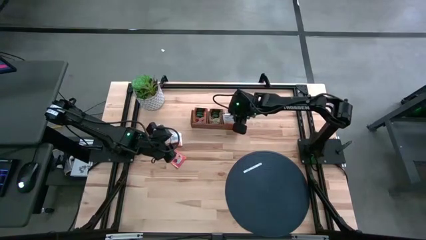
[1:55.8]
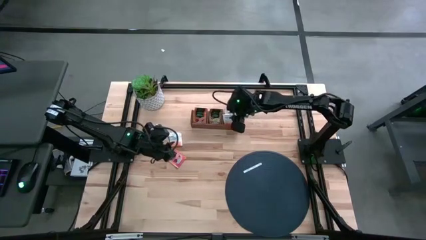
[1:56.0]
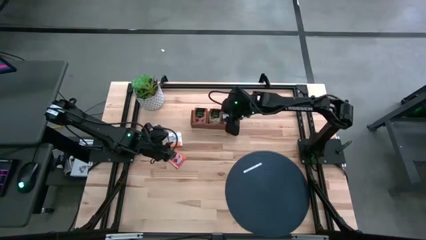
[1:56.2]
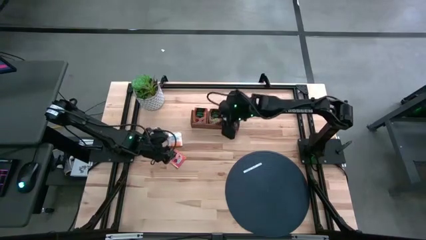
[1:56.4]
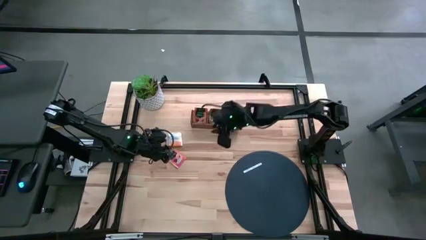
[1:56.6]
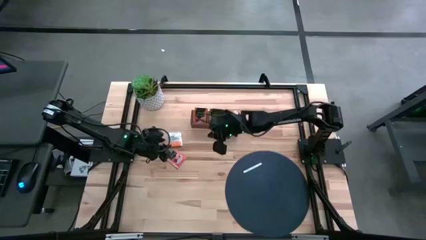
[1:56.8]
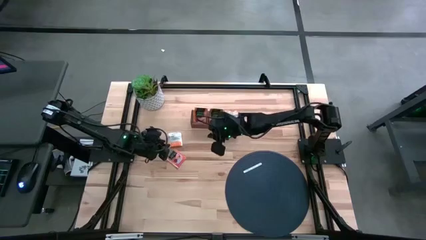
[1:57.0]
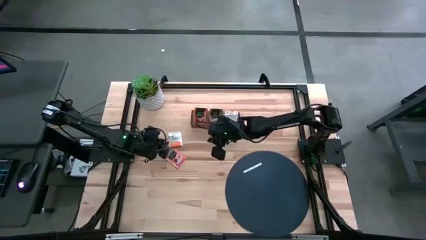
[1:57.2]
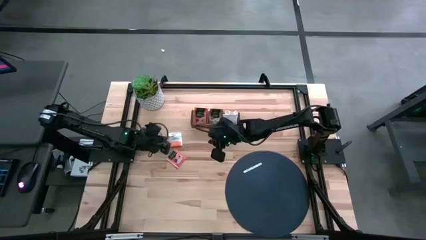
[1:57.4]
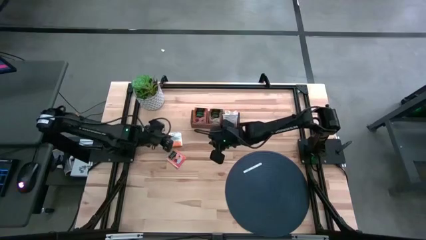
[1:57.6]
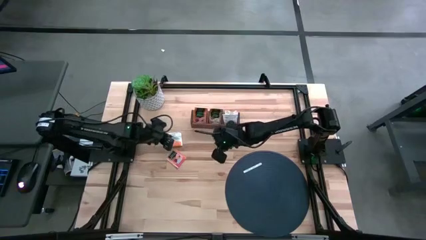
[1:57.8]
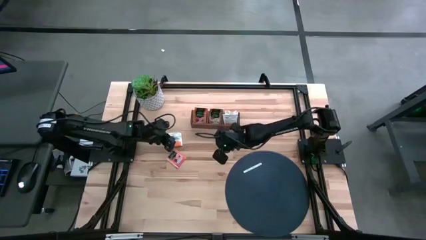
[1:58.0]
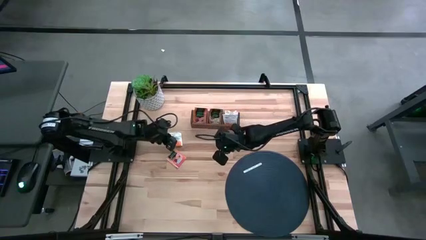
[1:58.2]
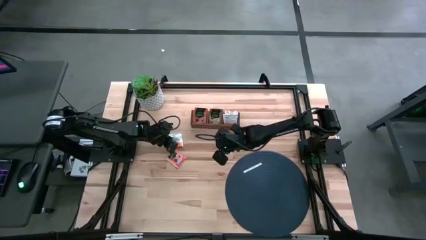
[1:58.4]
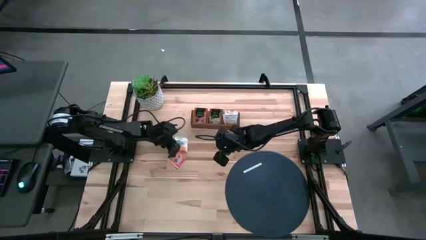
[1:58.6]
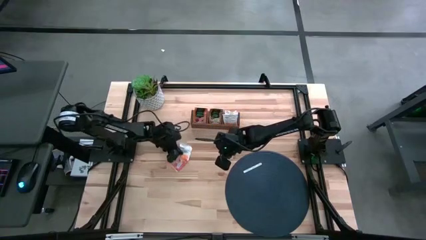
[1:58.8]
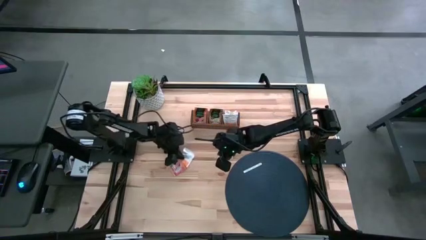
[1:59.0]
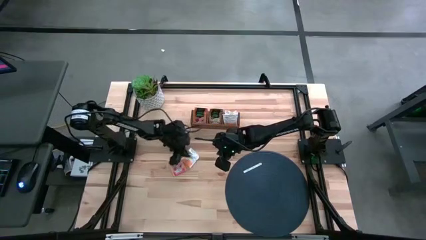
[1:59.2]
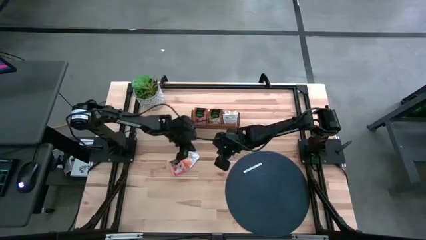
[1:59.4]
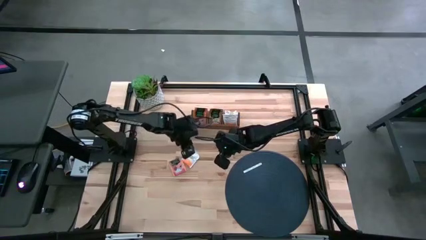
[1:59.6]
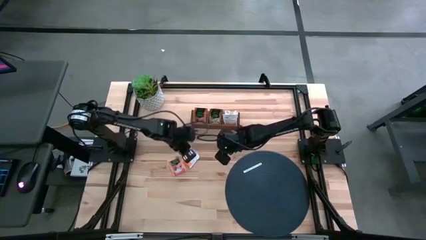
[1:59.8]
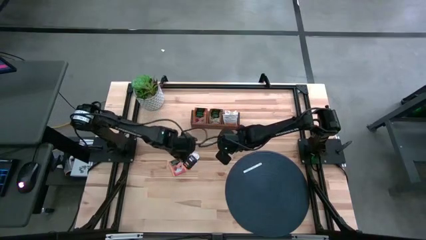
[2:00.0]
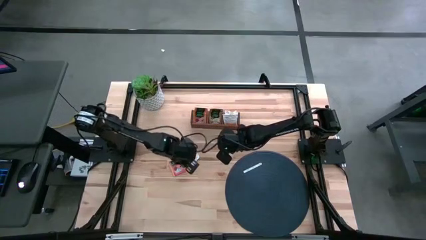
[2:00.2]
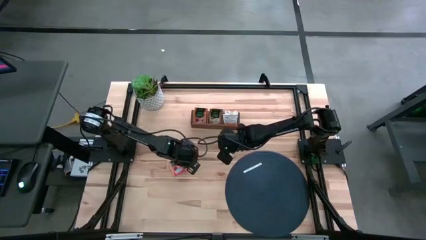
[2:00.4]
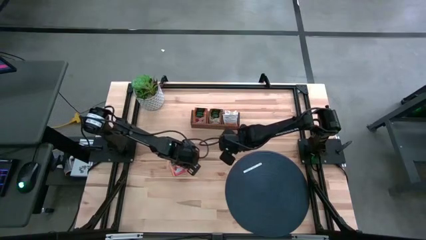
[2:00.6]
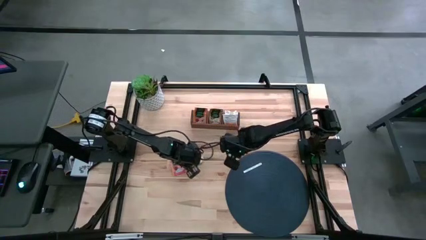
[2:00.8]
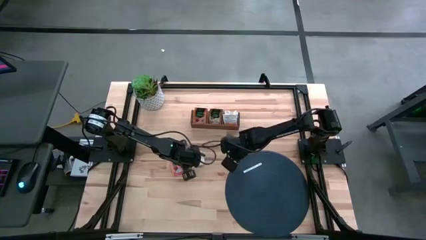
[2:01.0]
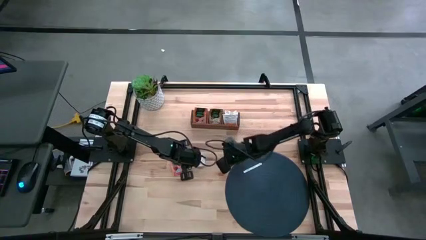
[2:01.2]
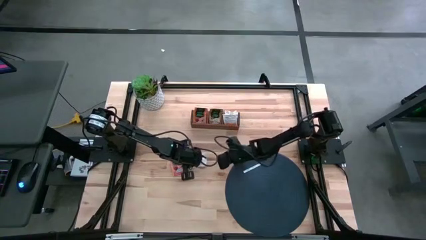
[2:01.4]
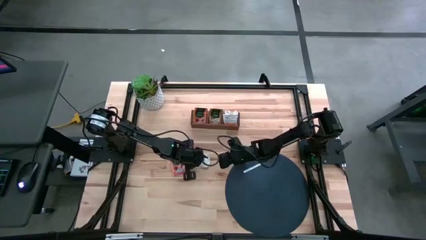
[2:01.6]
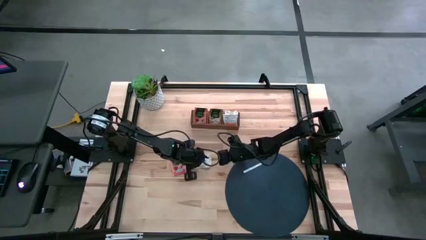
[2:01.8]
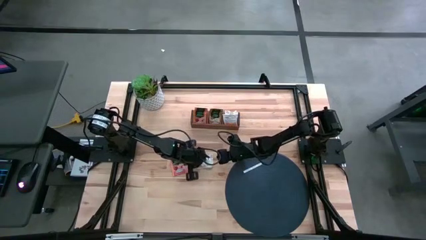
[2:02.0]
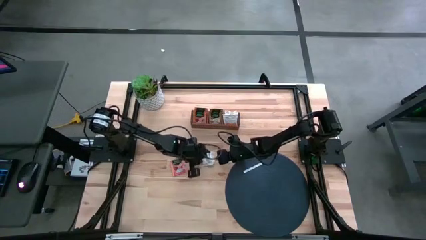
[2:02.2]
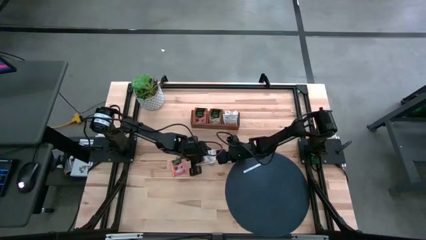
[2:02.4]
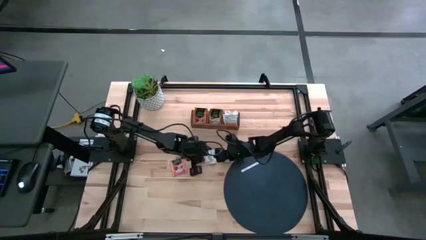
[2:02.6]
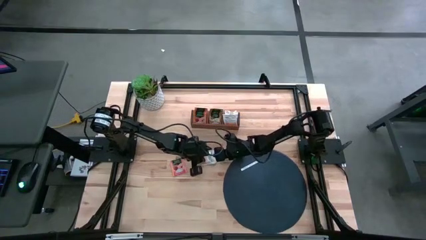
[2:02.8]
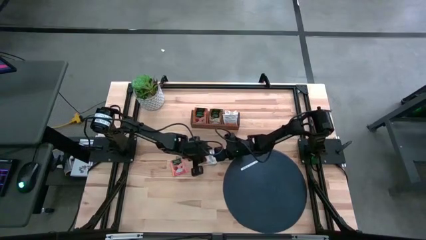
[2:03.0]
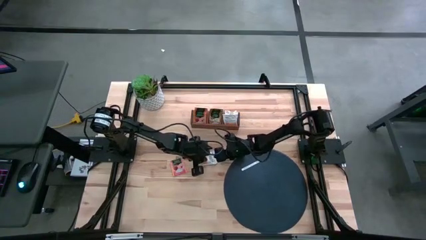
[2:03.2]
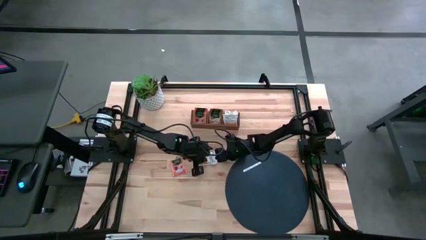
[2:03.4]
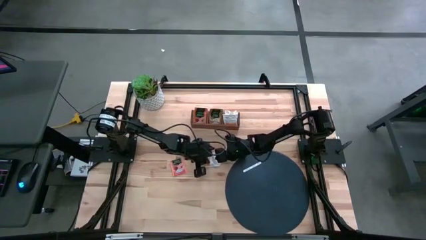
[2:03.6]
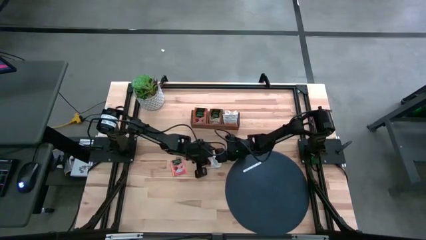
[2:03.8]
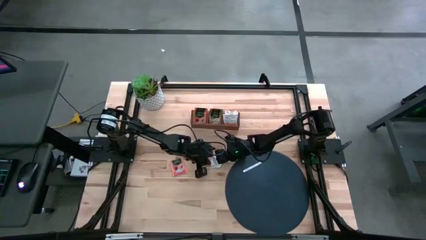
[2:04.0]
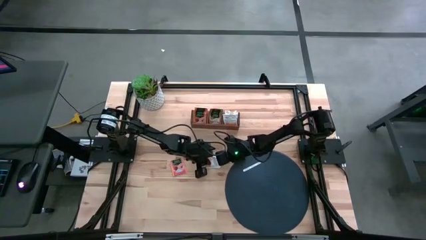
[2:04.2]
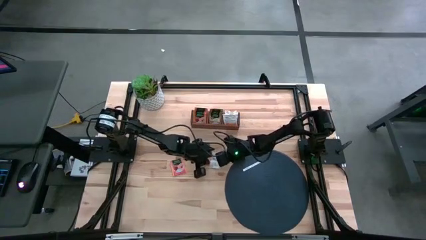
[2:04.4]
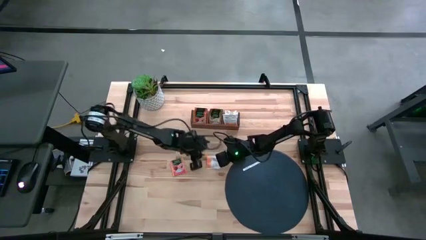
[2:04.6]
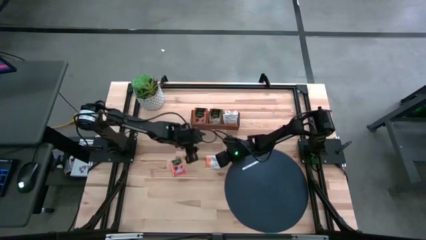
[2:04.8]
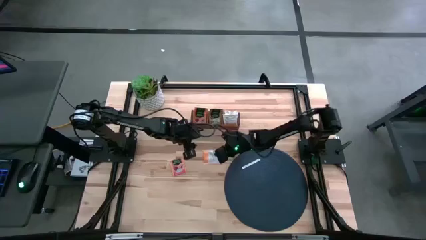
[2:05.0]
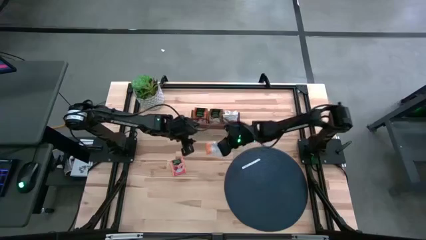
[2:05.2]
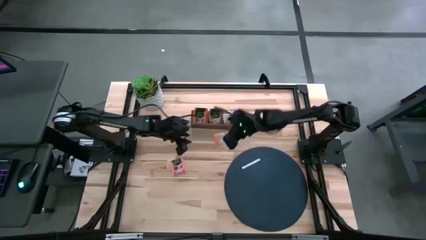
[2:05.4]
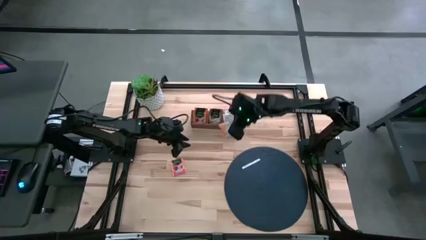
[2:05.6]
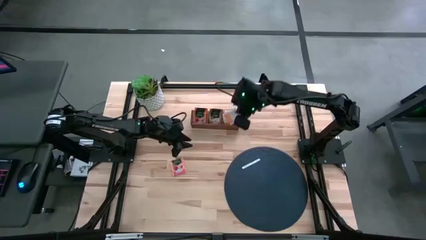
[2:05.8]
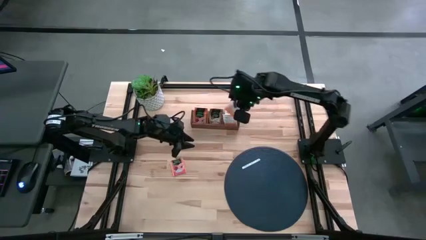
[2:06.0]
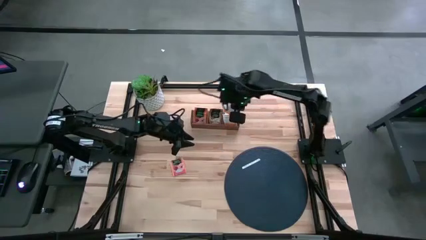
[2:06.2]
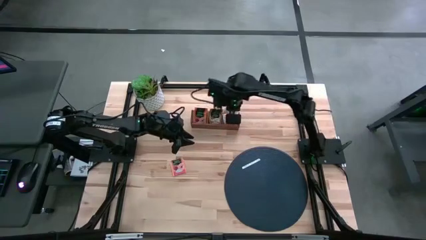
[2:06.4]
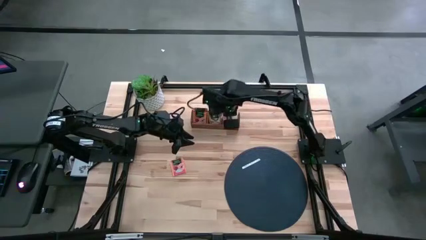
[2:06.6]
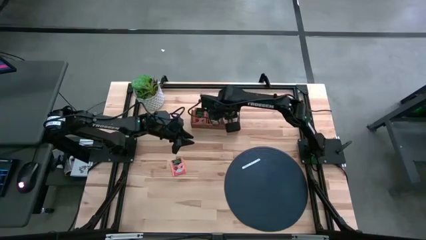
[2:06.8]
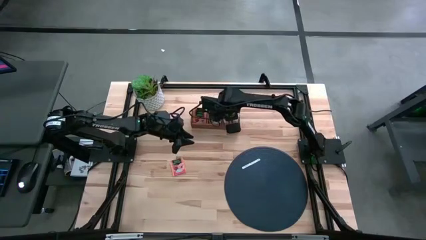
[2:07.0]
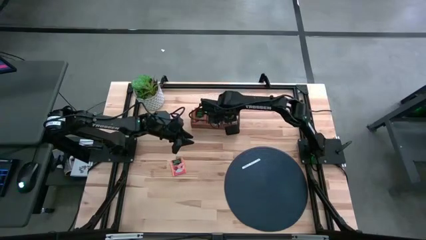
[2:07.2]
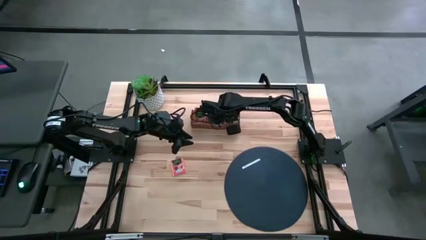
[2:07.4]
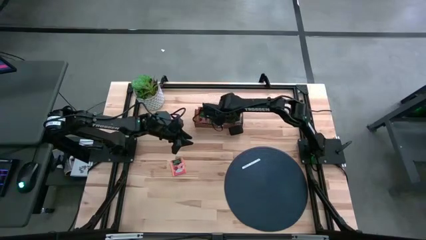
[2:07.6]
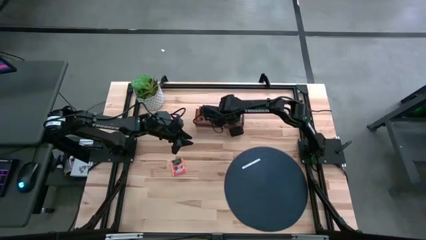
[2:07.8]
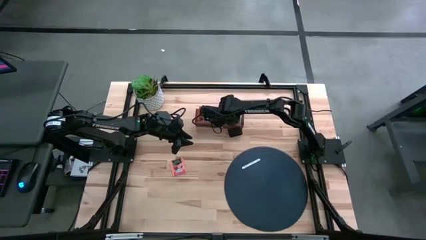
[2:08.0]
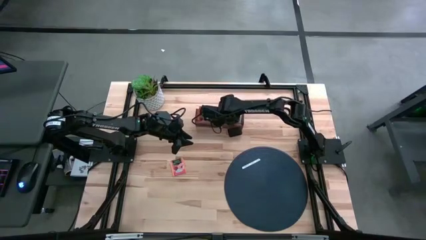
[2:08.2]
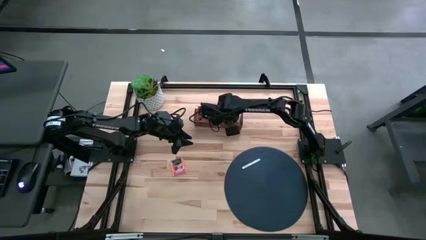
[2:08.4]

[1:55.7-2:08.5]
Task: Pick & Place Tea
Put the white orange tea sachet into the right section of the wooden organizer
